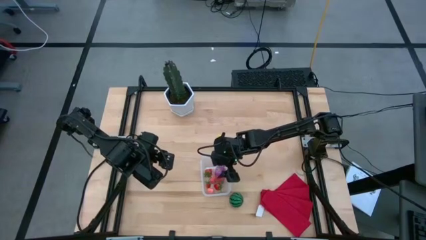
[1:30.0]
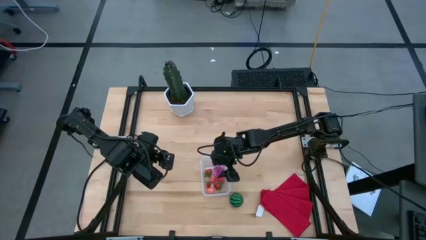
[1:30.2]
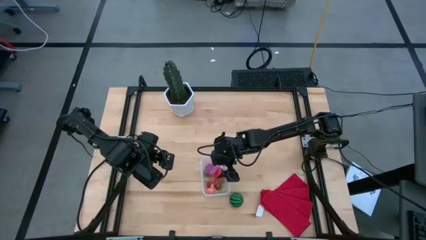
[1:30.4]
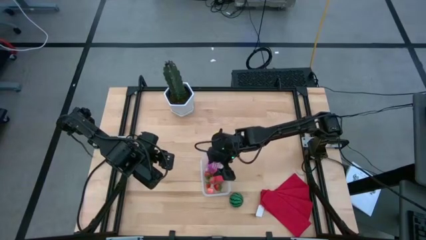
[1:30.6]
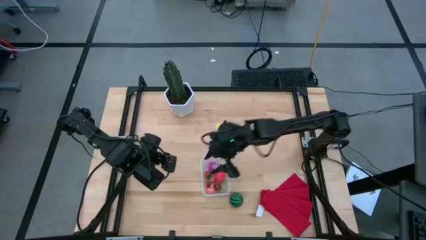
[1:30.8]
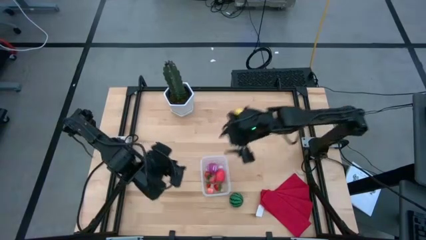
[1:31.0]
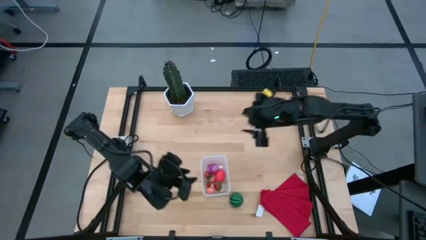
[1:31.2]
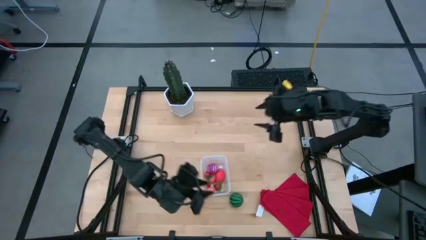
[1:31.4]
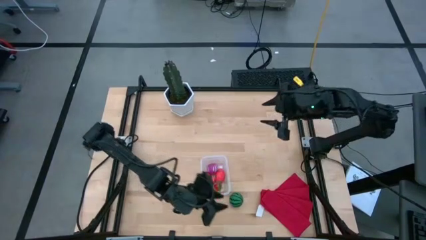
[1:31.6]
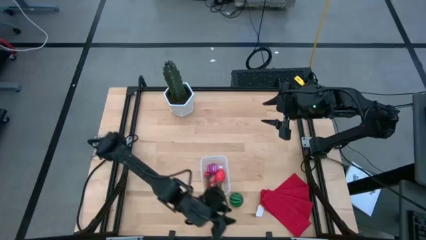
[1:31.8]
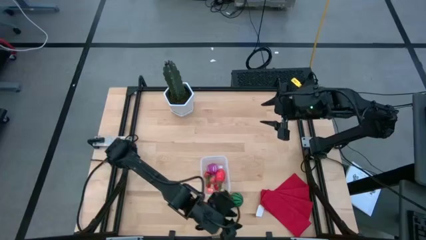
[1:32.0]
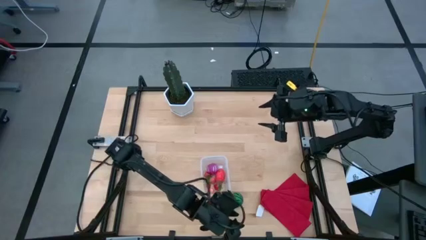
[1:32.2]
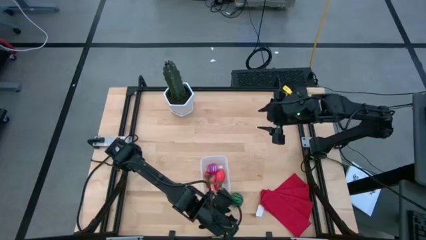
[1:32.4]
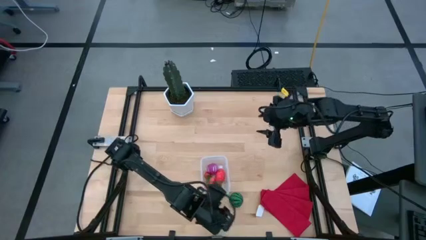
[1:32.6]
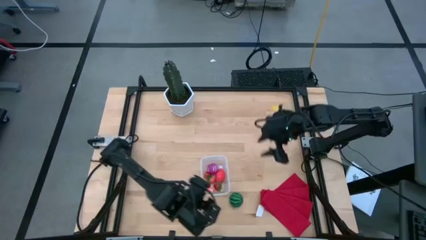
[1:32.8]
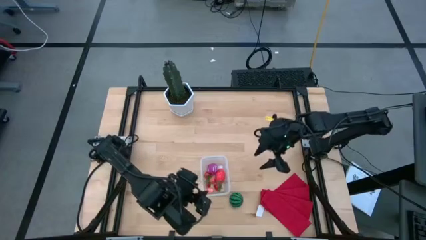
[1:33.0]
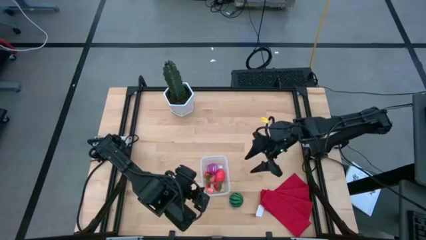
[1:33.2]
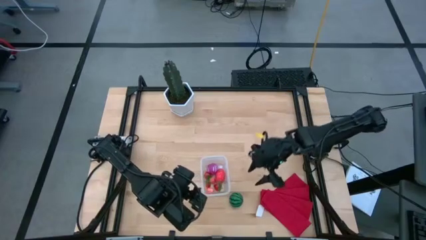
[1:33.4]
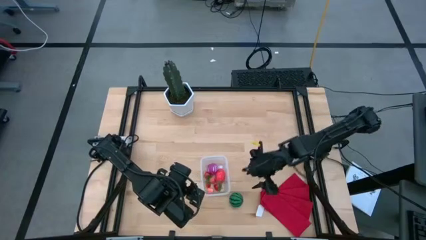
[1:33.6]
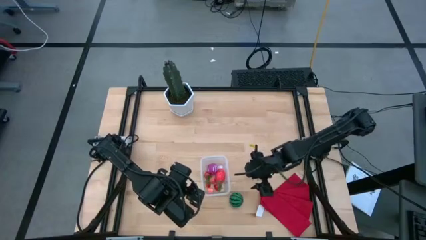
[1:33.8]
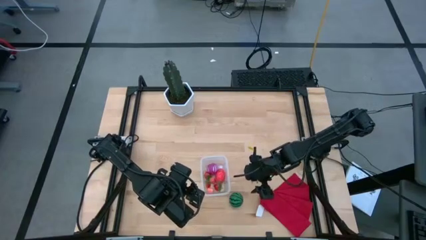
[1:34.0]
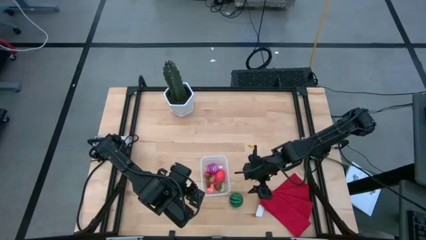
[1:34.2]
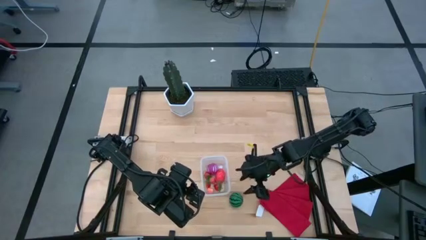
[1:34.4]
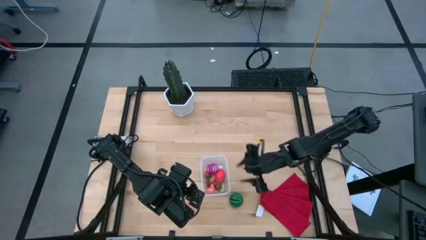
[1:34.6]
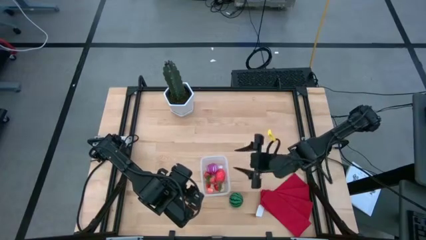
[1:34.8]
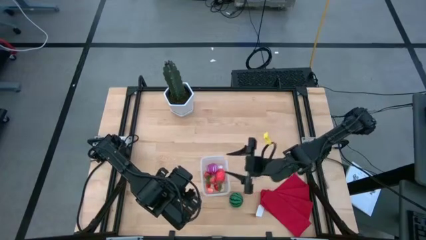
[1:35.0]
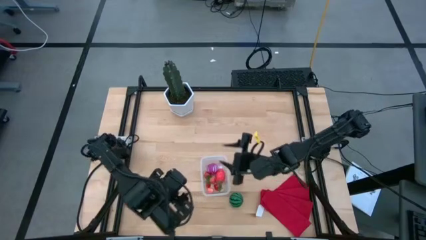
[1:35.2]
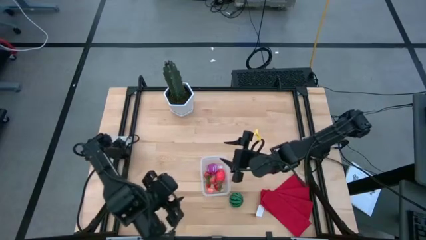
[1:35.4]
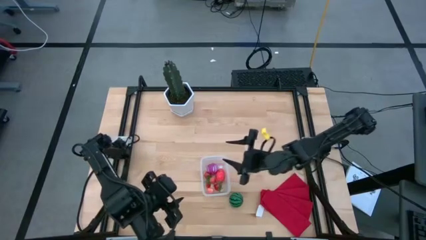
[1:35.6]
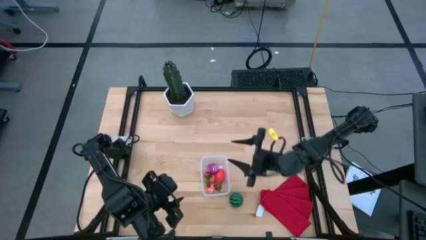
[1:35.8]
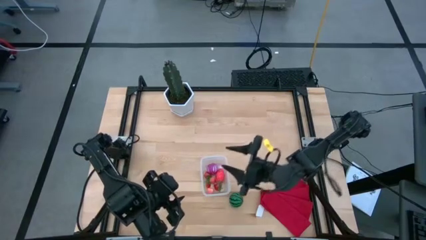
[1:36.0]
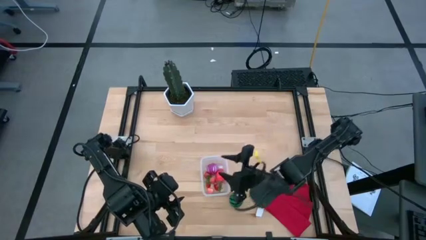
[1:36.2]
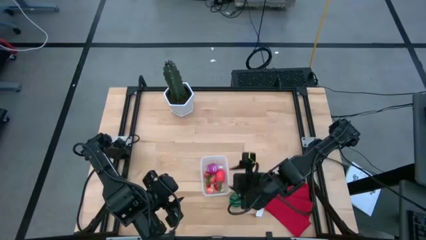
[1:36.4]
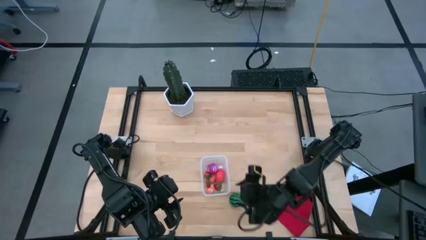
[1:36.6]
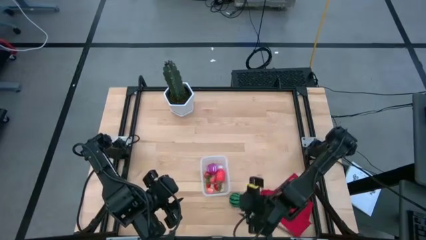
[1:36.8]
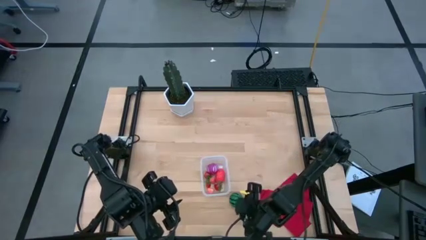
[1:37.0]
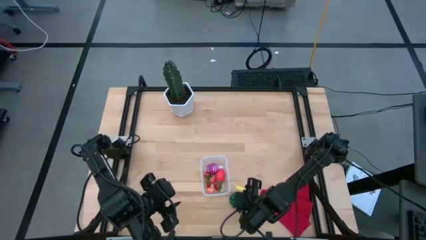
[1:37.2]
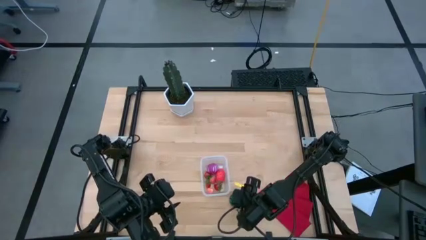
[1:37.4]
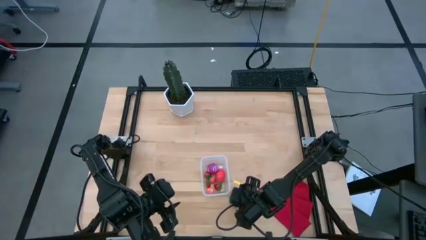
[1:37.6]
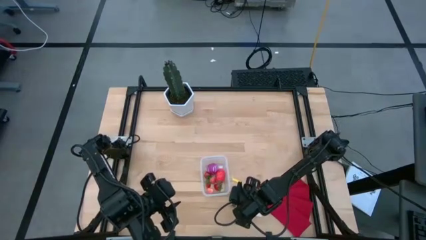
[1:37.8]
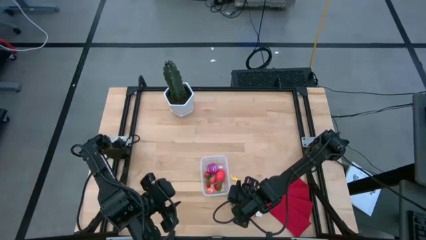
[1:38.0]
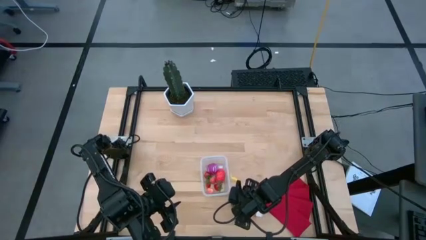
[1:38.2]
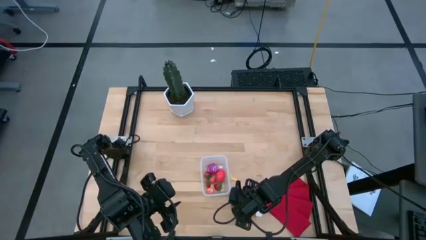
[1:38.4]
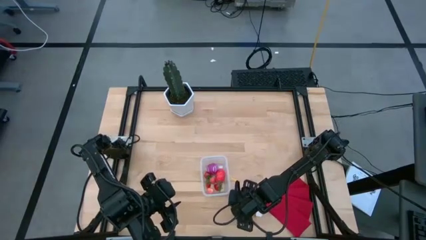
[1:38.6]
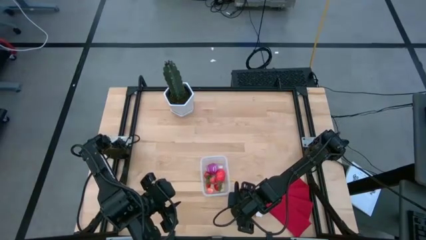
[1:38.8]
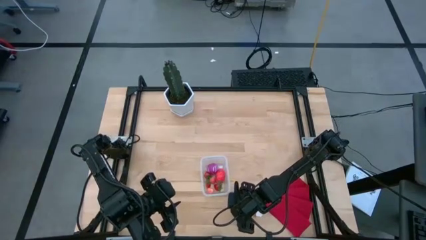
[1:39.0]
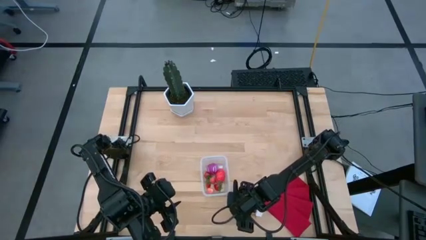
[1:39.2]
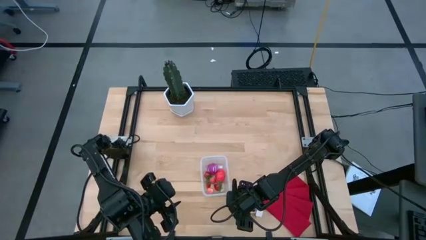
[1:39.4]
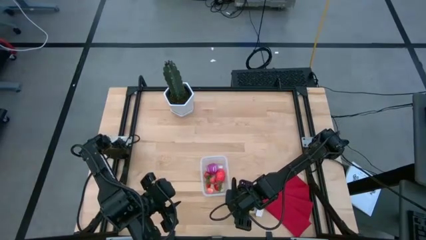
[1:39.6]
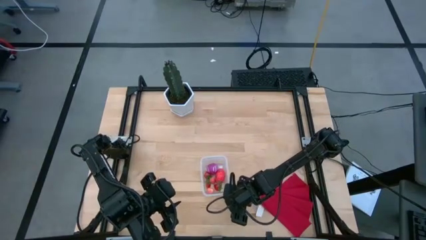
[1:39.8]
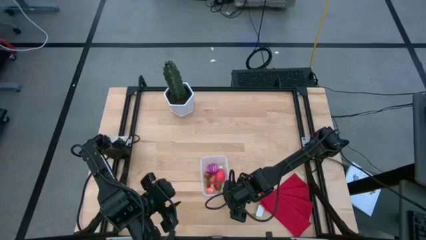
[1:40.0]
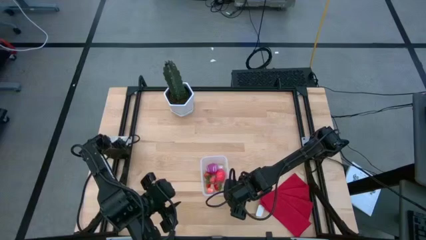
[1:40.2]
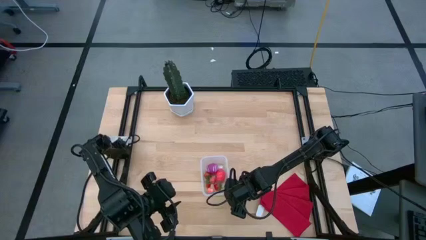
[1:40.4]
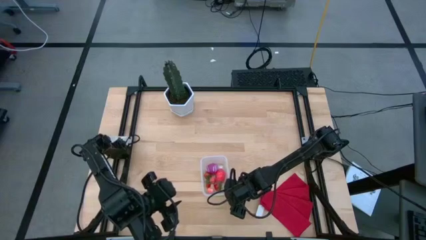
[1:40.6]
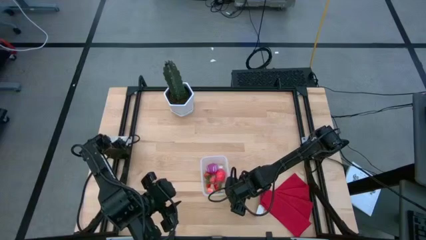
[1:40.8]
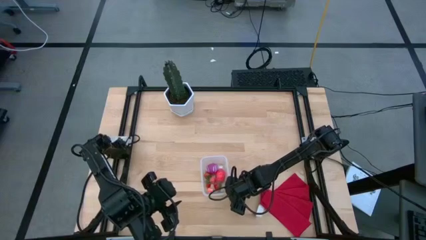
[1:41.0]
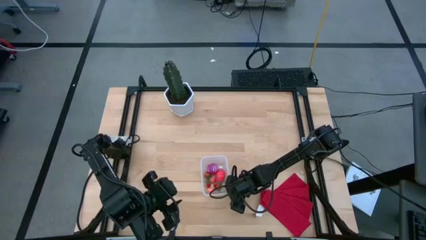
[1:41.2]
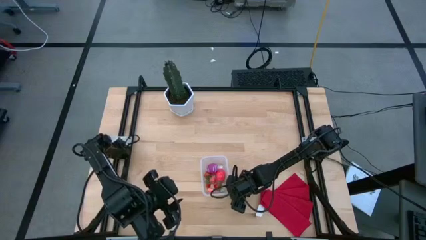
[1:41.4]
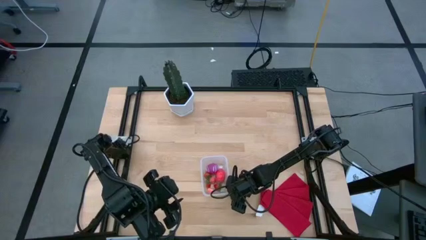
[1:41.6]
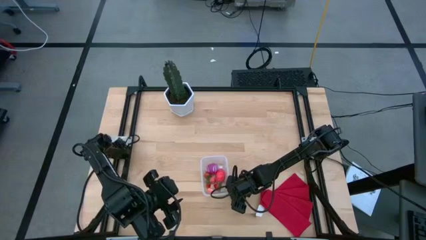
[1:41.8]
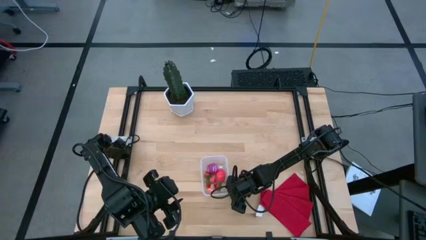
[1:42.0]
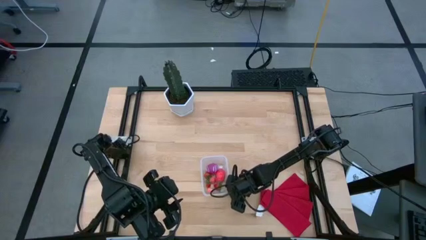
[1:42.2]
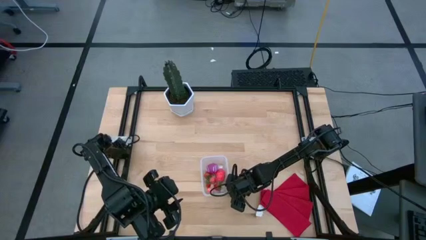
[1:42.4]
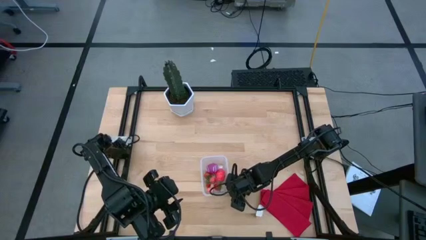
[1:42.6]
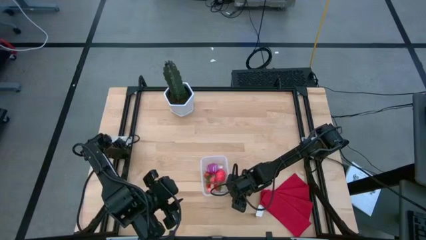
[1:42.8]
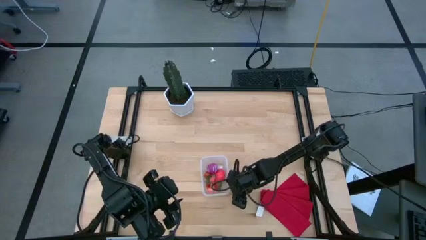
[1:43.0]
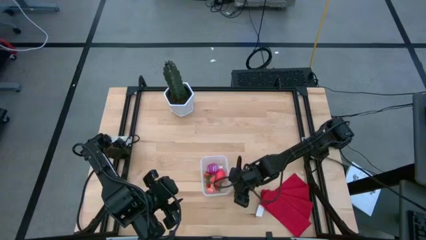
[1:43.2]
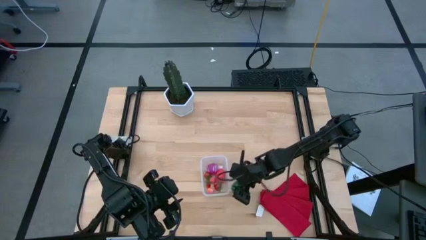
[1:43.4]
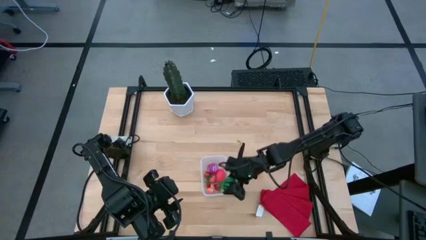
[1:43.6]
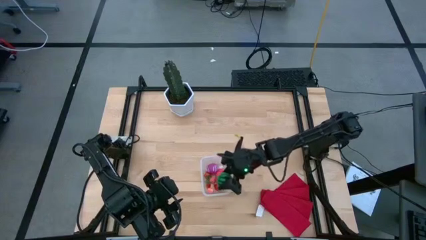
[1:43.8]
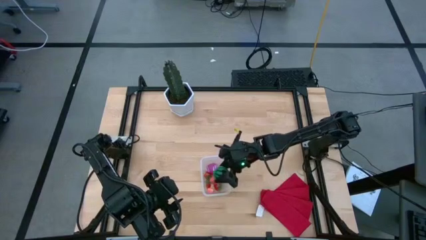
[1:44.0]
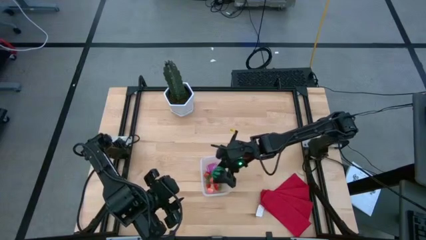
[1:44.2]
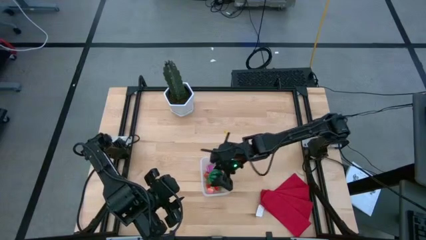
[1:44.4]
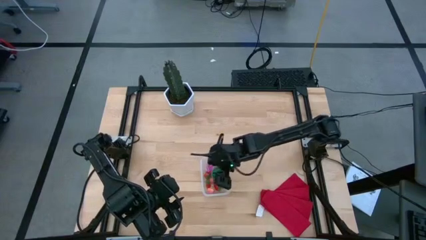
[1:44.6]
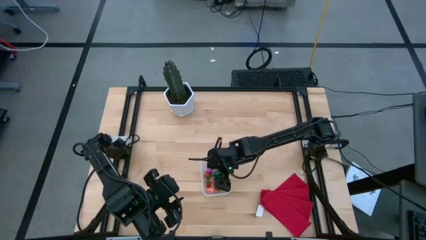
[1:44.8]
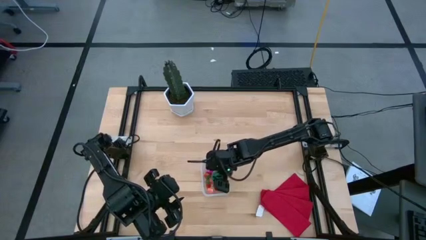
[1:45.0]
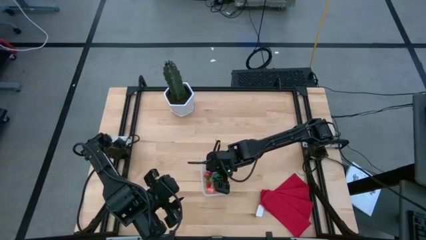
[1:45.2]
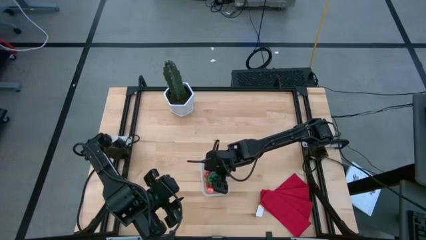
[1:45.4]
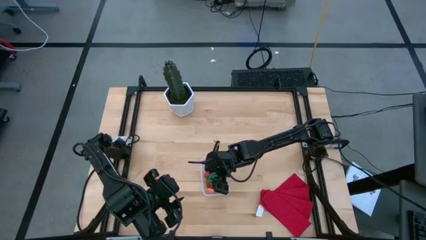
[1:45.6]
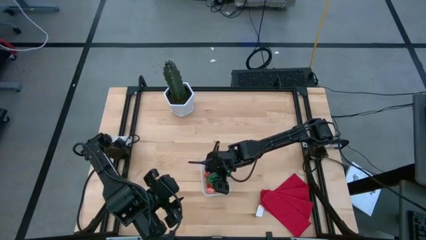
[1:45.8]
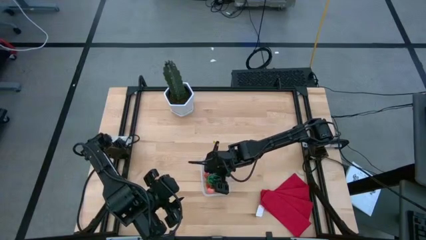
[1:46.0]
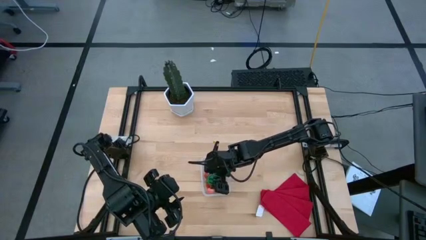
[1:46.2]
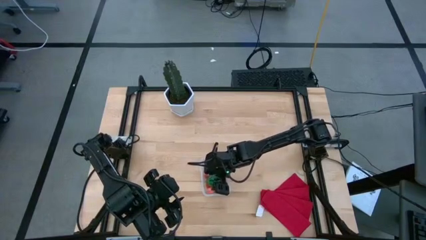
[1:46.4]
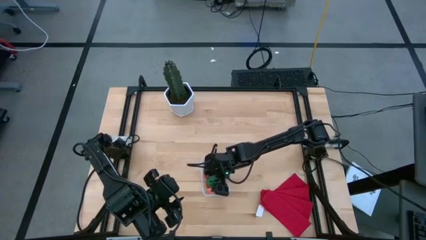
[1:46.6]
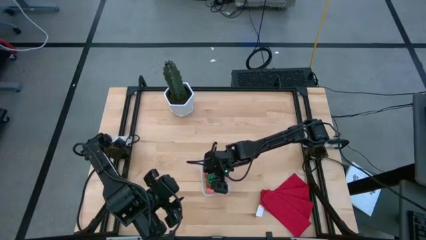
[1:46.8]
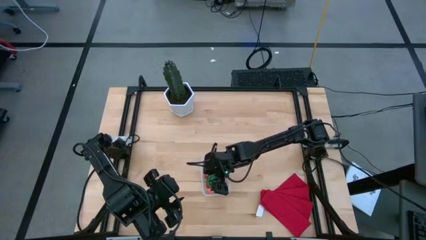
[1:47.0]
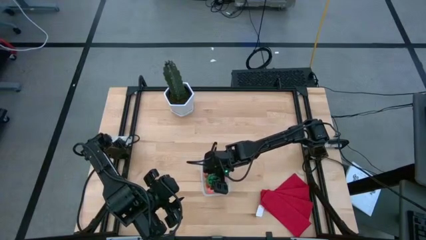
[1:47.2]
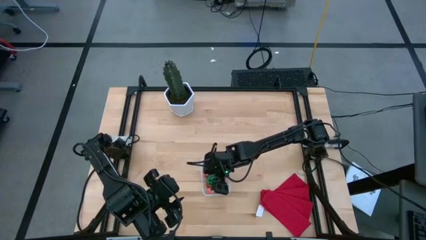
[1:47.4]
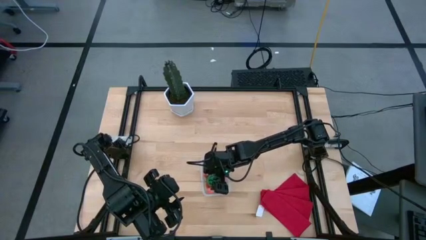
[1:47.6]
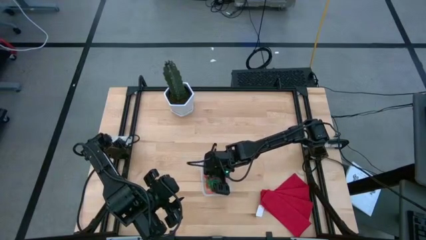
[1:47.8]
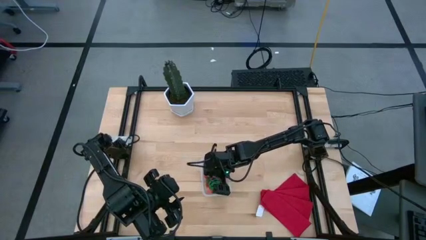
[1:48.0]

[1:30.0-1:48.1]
Task: Pick and placing Produce into tupperware
Put the watermelon into the transparent bin
